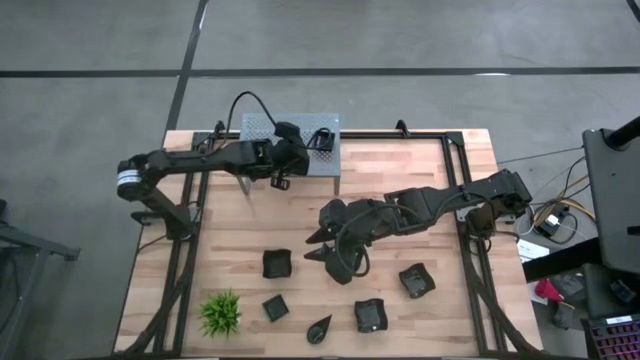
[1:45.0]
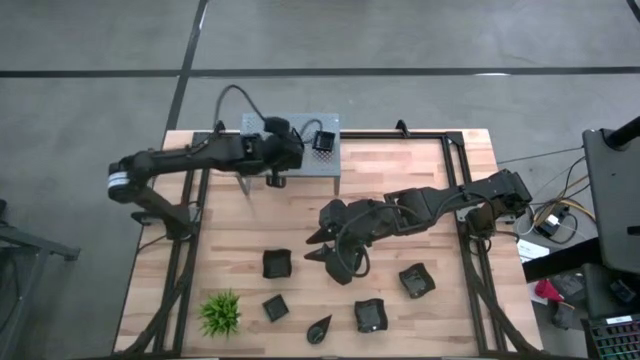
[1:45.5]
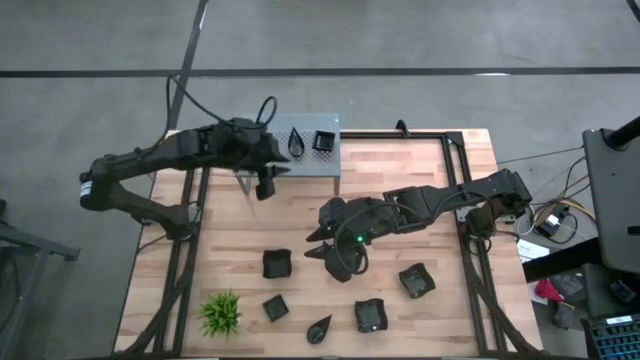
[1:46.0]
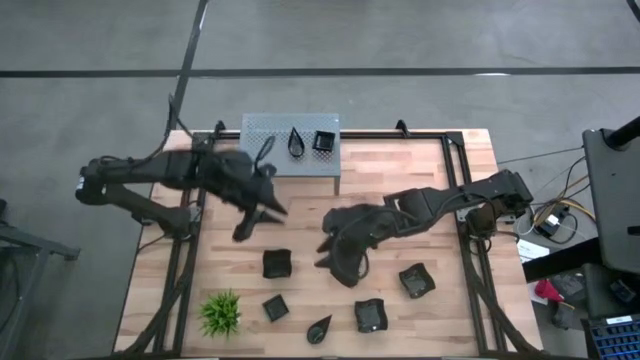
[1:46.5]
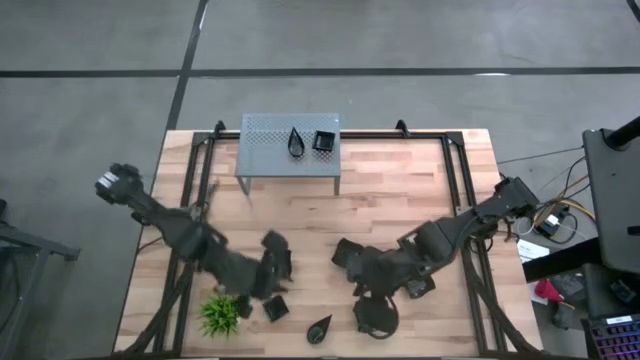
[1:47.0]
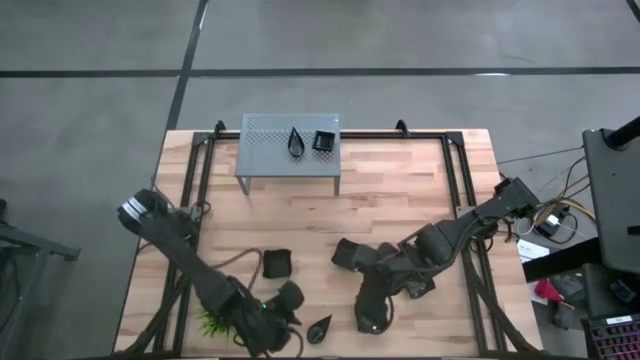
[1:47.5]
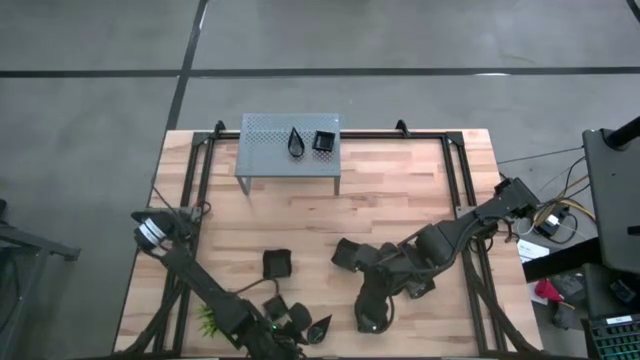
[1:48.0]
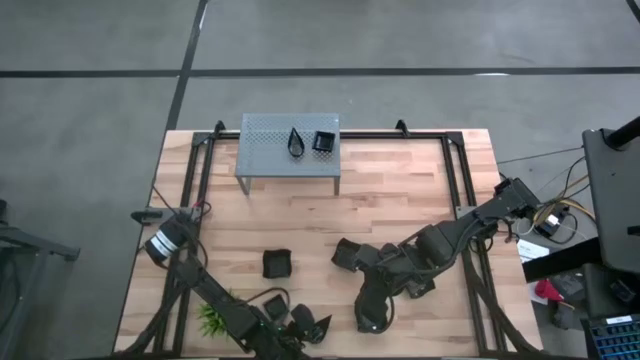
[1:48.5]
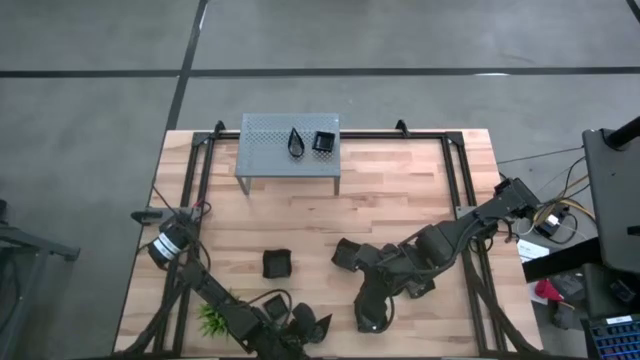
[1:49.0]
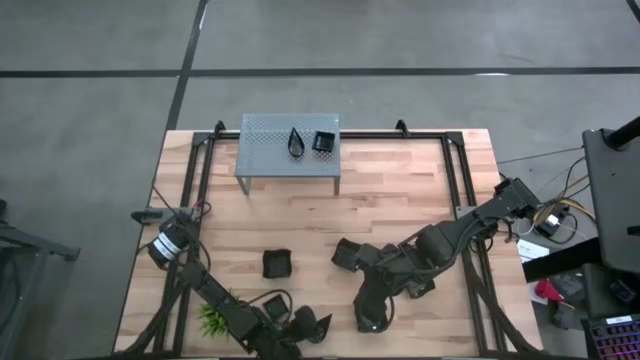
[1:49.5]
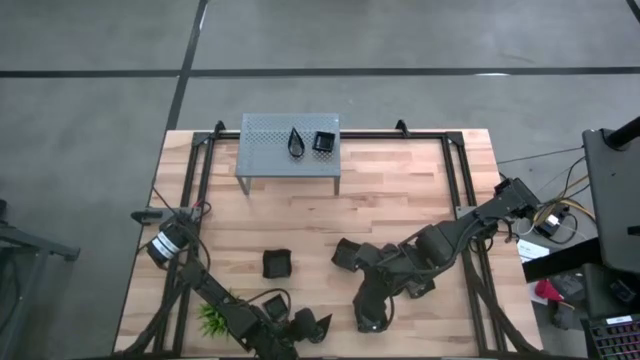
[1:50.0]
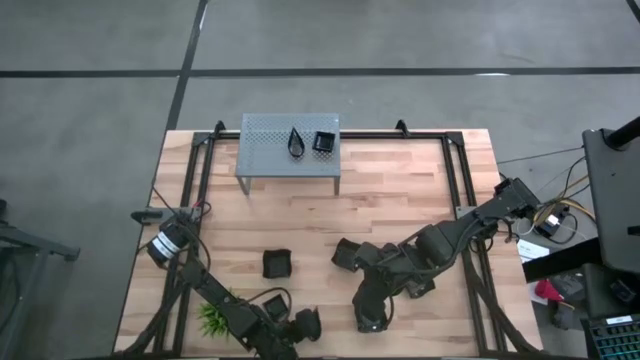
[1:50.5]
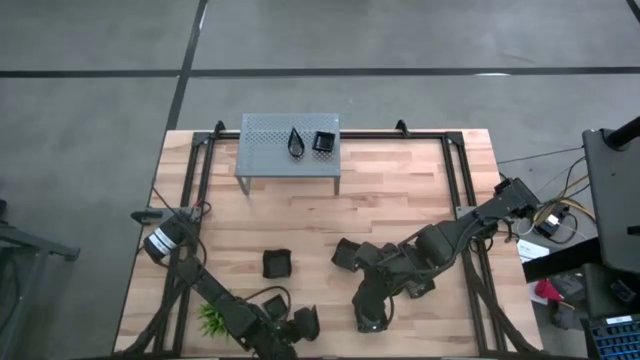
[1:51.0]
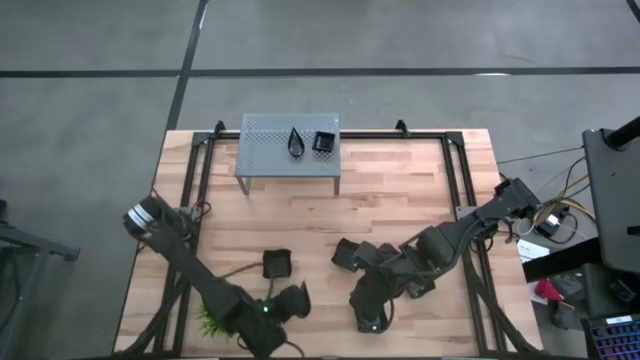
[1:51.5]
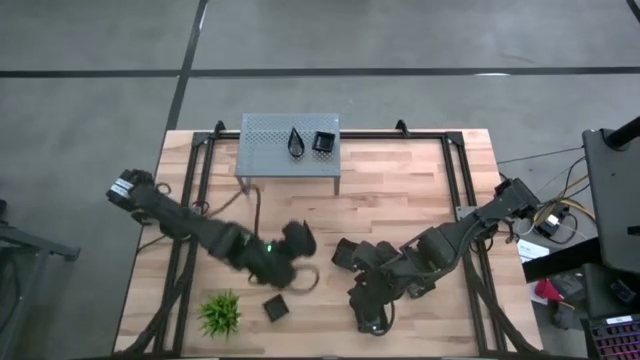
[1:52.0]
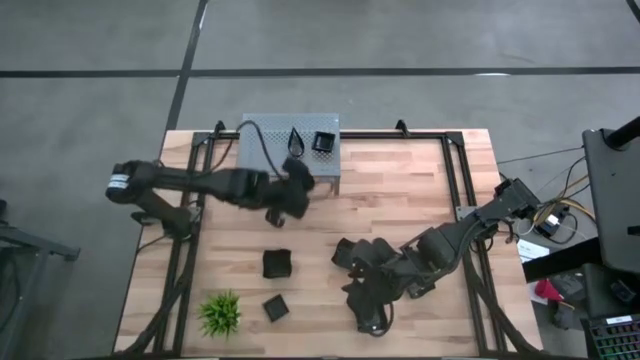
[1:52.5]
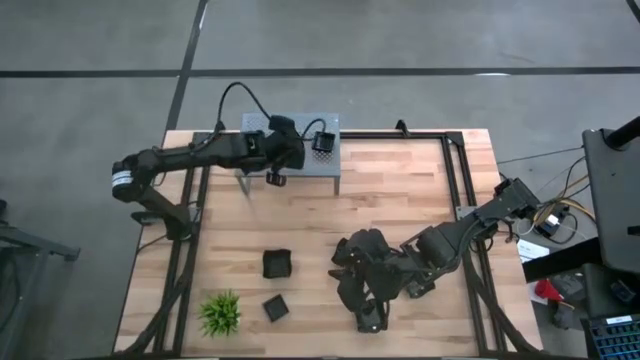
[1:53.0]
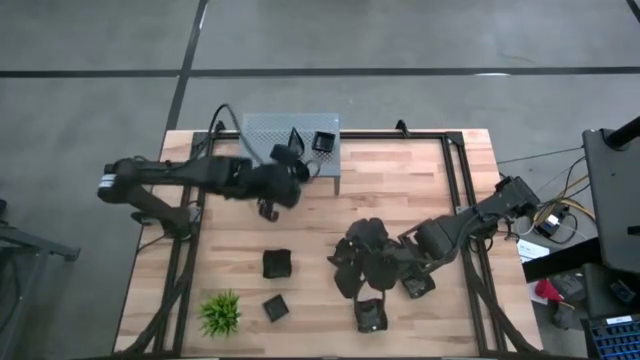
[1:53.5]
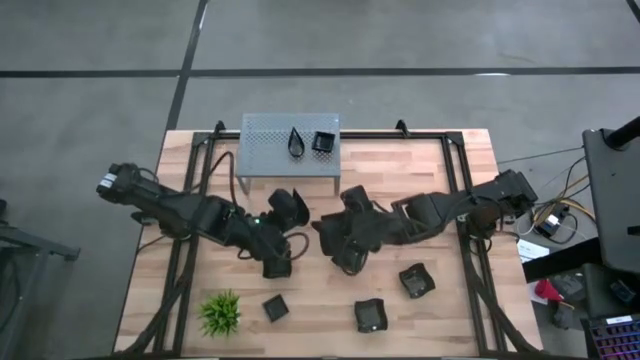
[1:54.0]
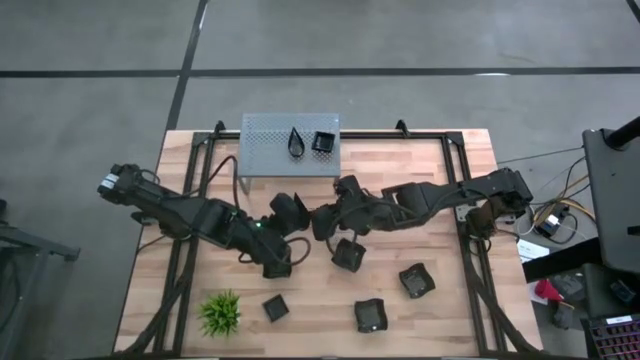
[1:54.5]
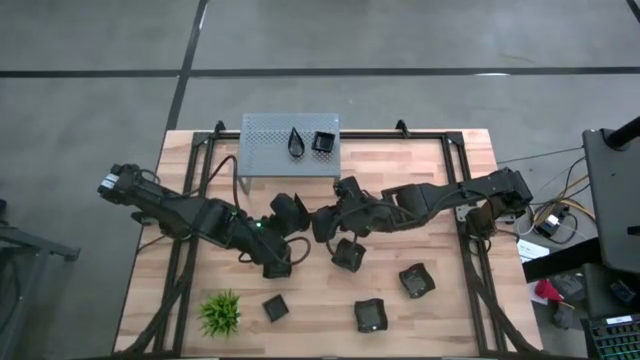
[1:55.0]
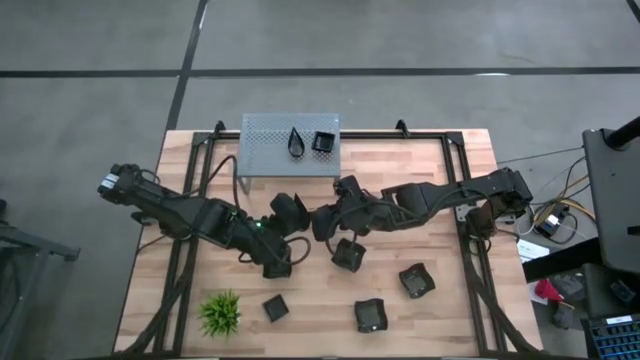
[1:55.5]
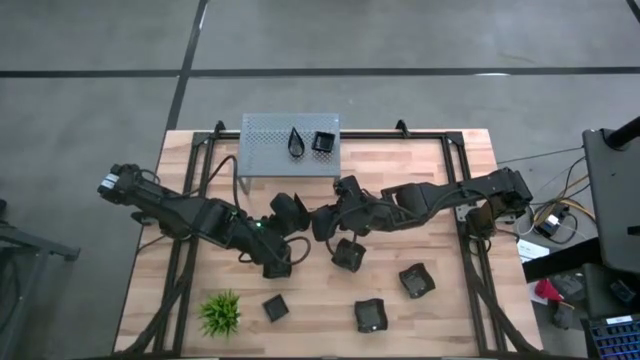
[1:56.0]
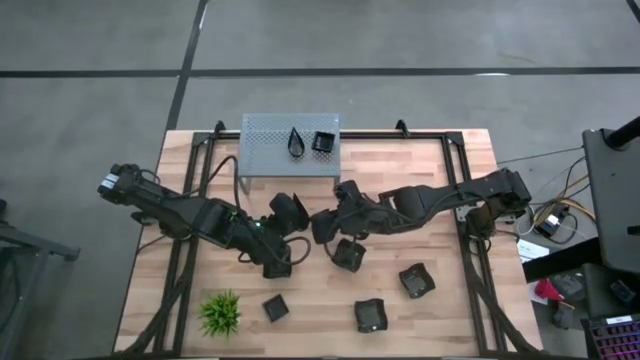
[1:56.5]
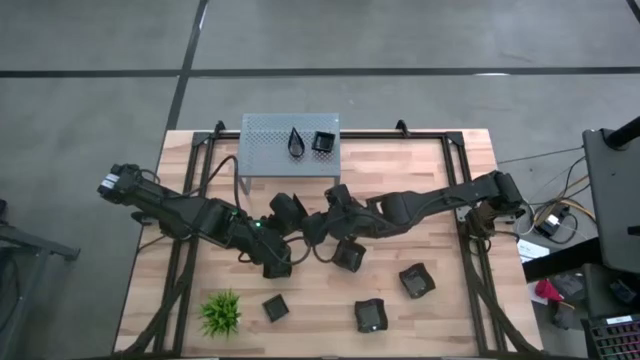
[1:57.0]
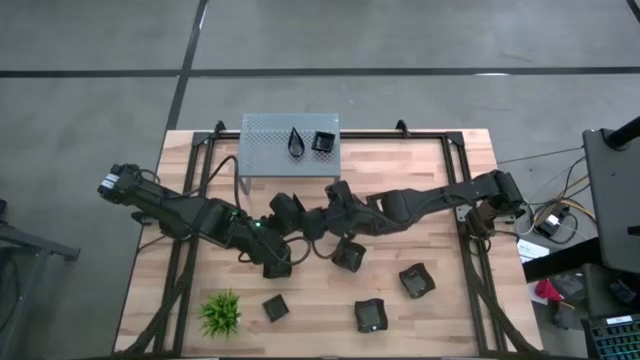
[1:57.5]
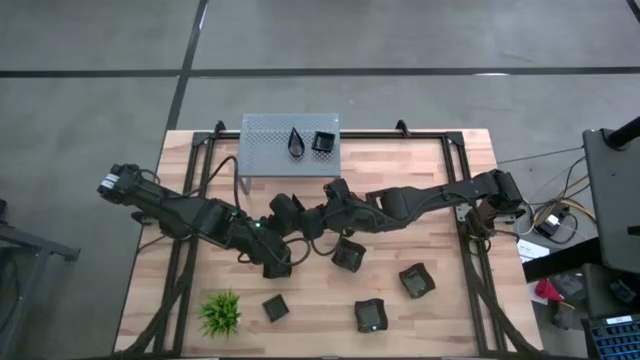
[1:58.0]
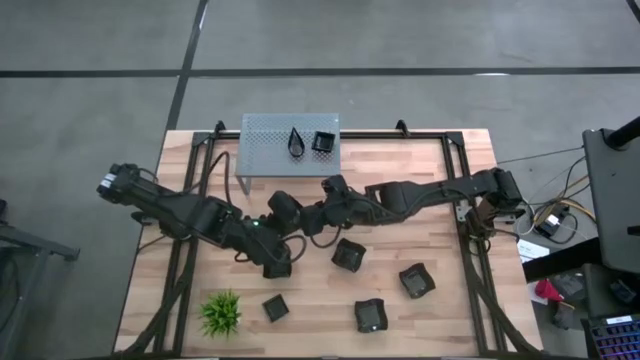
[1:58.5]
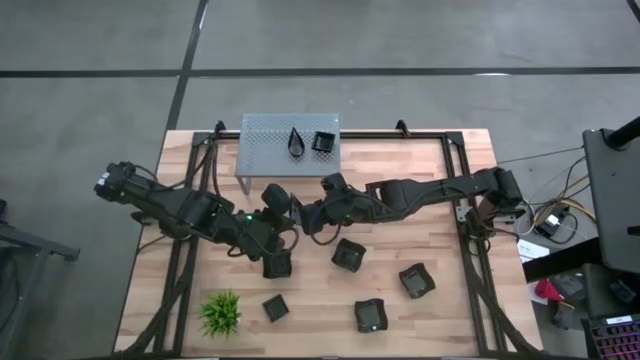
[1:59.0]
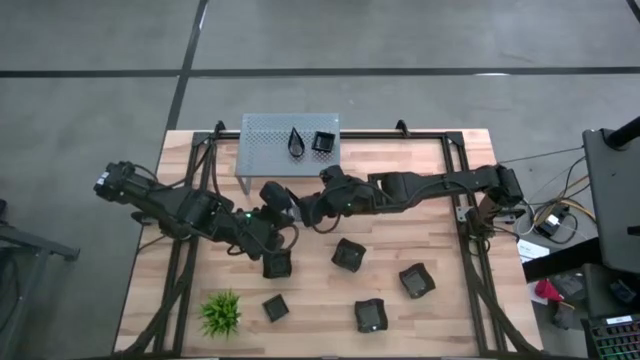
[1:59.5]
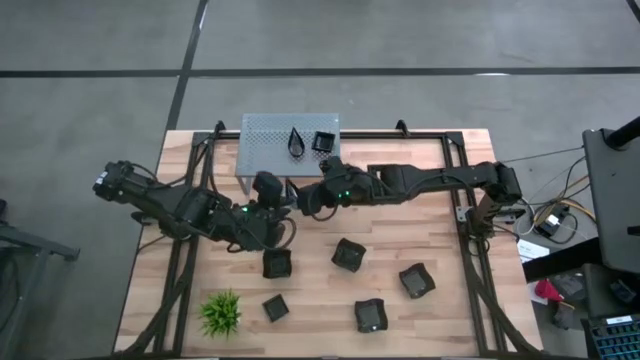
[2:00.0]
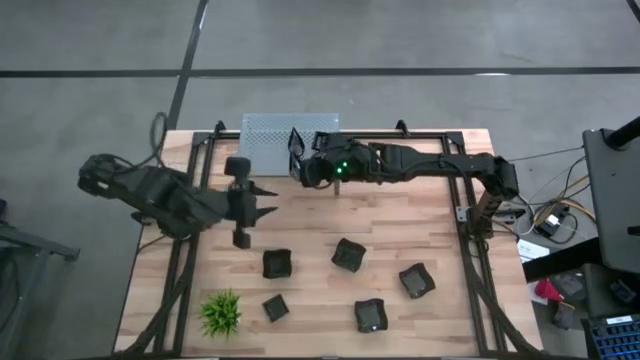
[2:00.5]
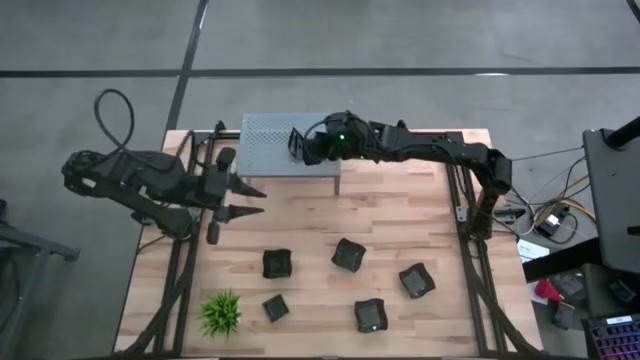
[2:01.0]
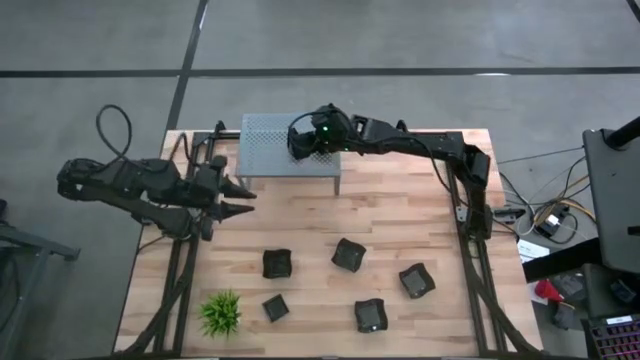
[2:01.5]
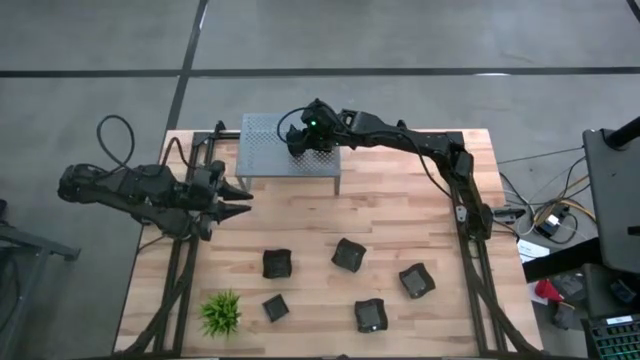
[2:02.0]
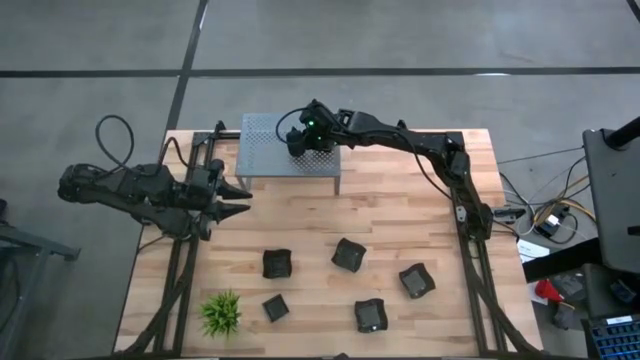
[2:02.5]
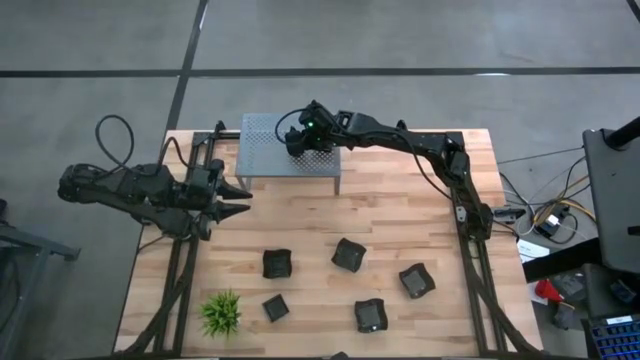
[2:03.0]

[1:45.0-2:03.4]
Task: Pick & Place Mini shaped plates
Stack the drop-shaped plate on the other drop plate on the shelf

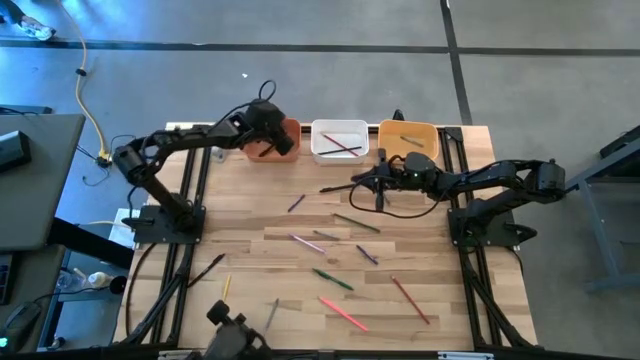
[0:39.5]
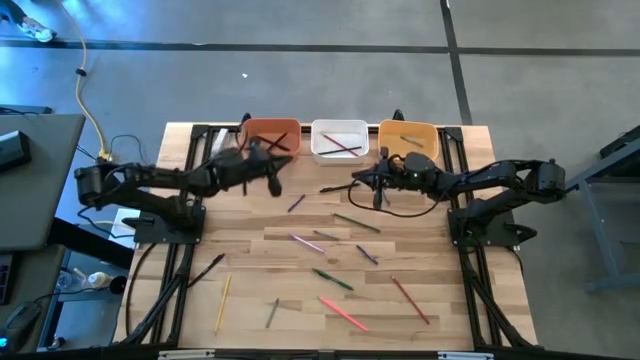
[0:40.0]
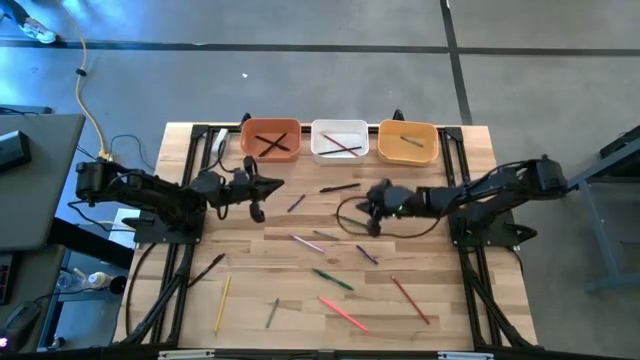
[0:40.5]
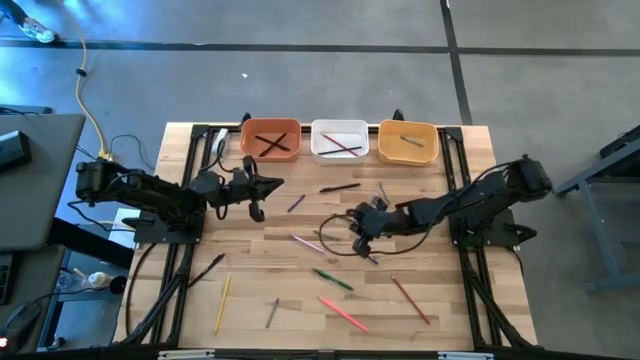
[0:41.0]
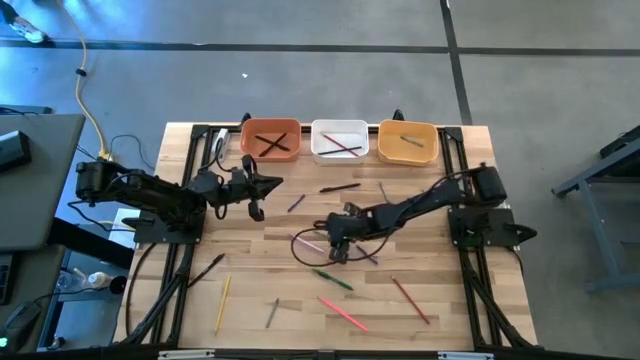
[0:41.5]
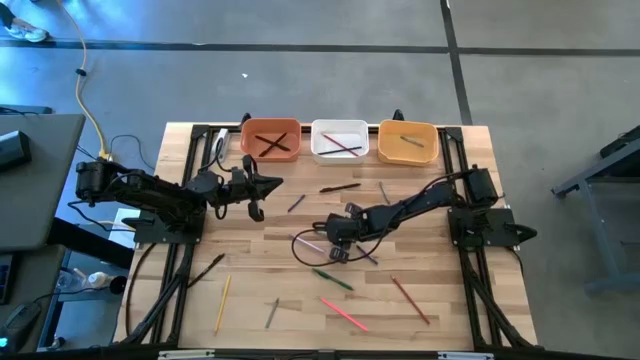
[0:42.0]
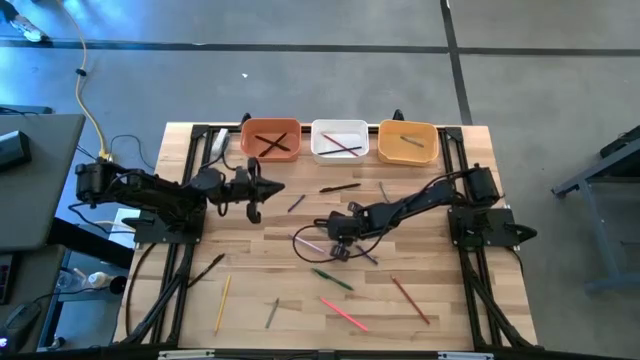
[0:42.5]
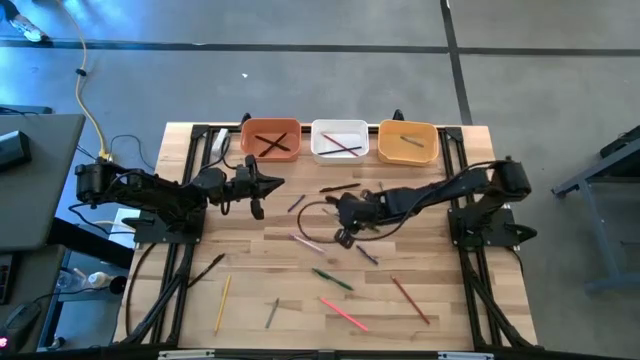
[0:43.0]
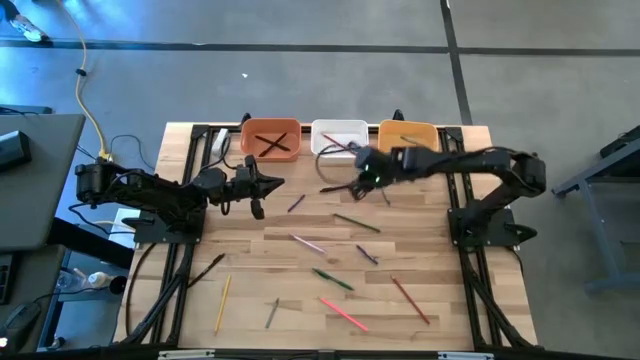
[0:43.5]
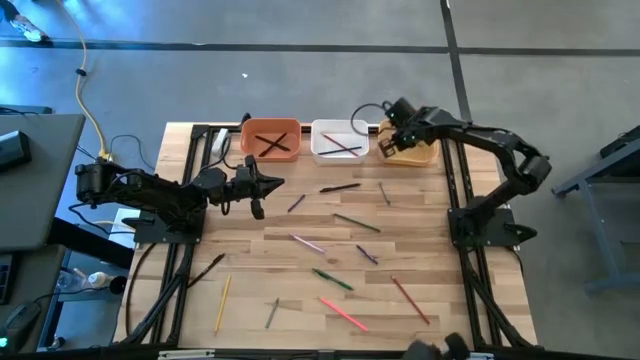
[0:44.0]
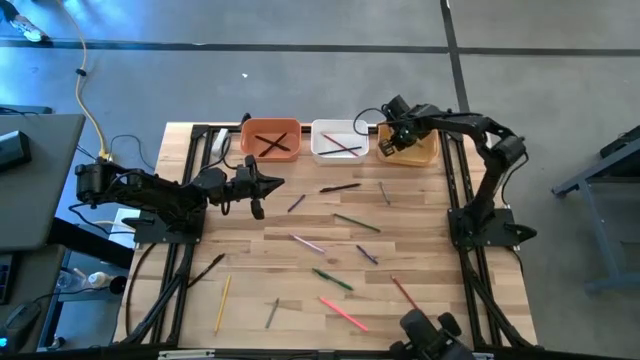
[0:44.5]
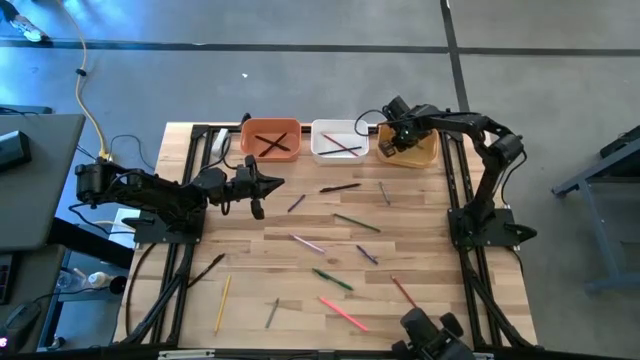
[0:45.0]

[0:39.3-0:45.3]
Task: Sort crayons/erasers/pens/pencils in bins
Put the center gray crayon into the yellow bin
